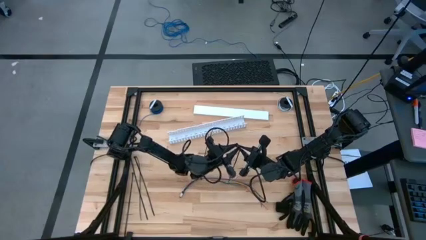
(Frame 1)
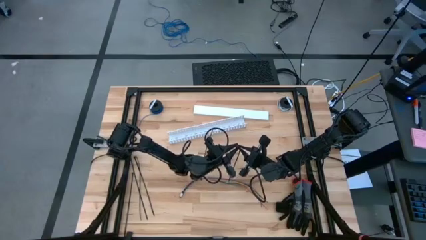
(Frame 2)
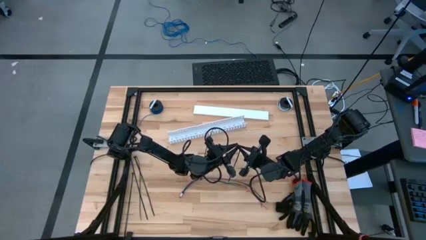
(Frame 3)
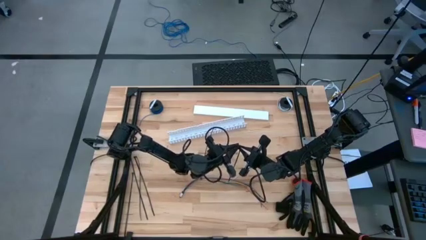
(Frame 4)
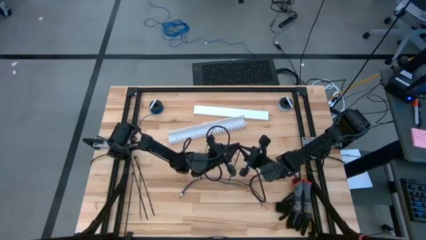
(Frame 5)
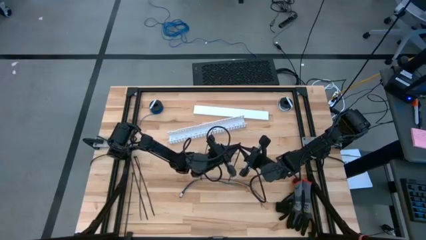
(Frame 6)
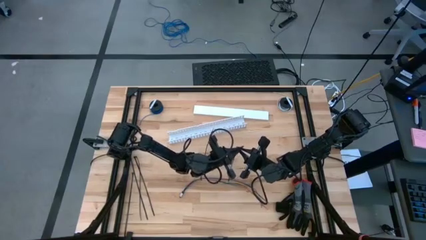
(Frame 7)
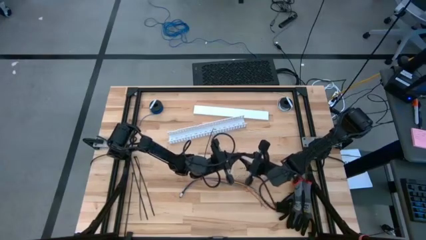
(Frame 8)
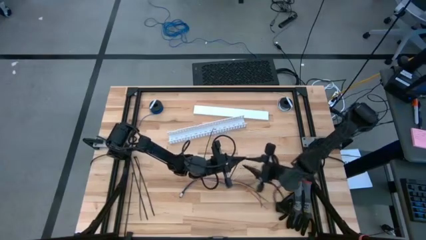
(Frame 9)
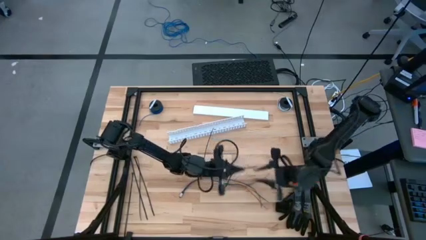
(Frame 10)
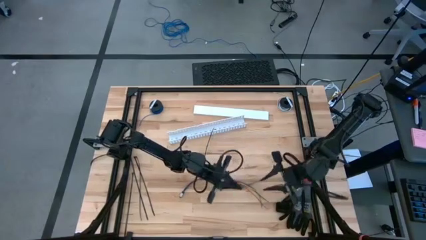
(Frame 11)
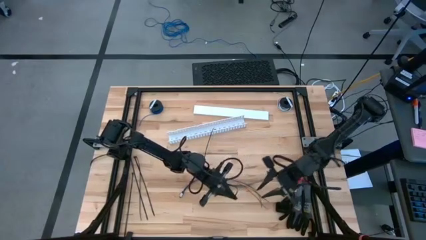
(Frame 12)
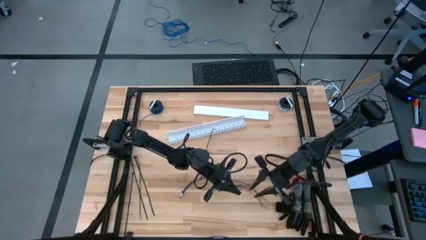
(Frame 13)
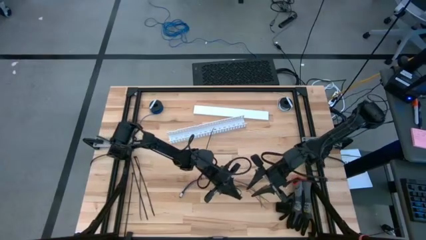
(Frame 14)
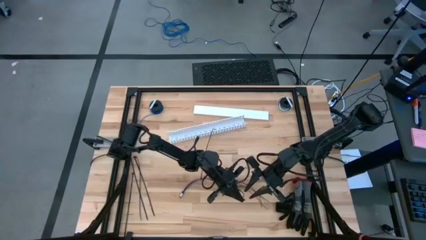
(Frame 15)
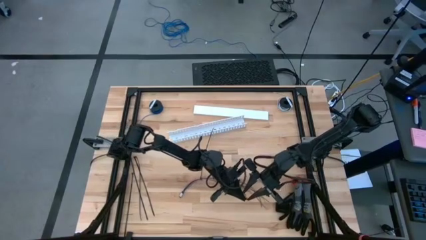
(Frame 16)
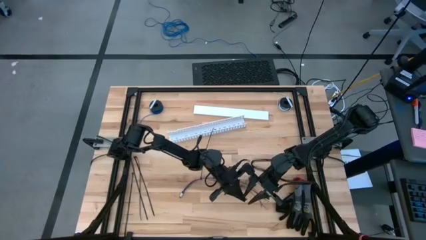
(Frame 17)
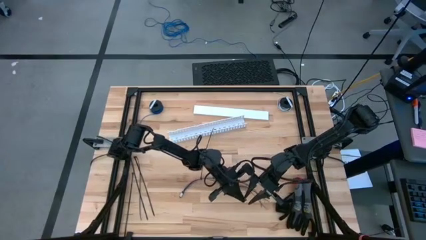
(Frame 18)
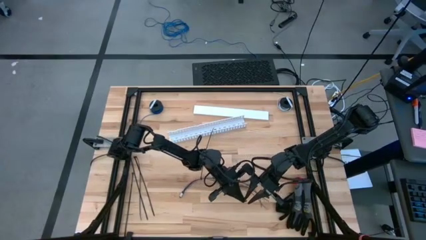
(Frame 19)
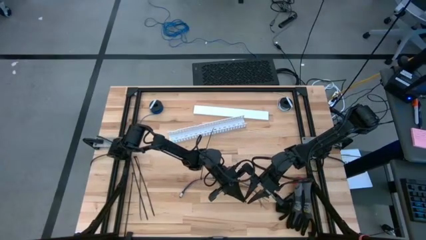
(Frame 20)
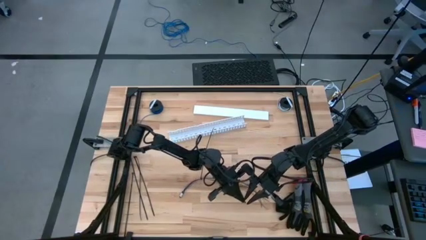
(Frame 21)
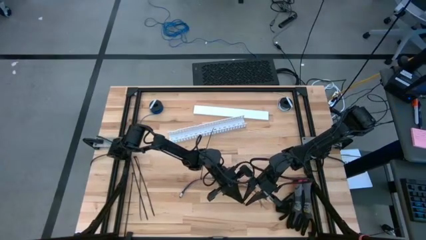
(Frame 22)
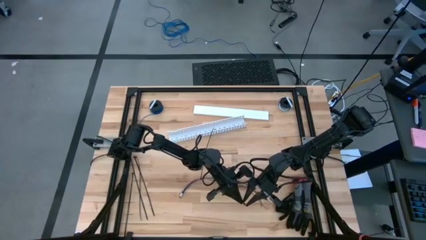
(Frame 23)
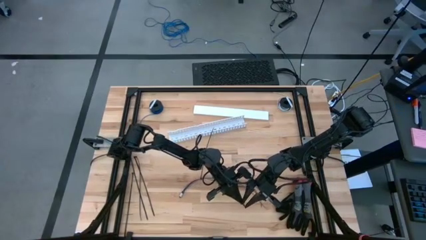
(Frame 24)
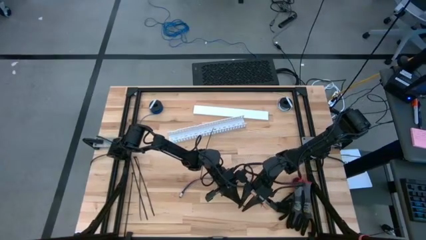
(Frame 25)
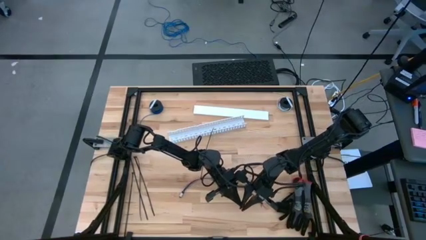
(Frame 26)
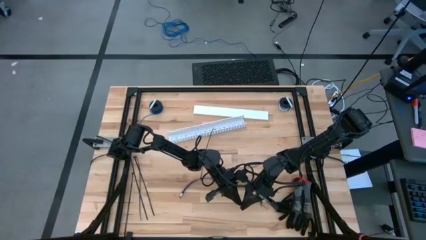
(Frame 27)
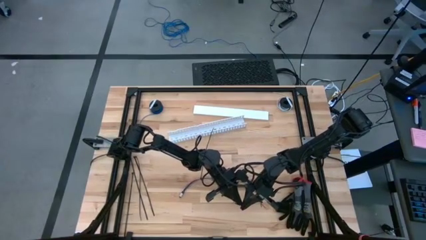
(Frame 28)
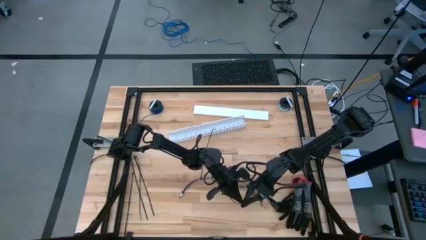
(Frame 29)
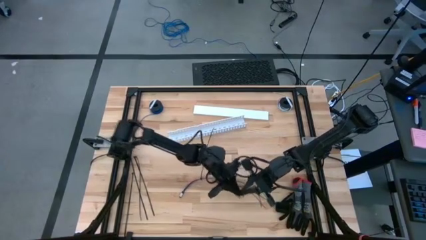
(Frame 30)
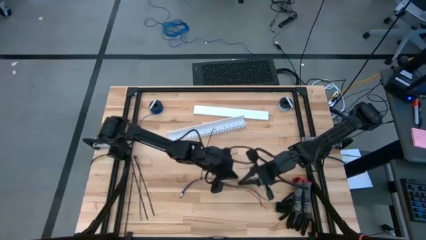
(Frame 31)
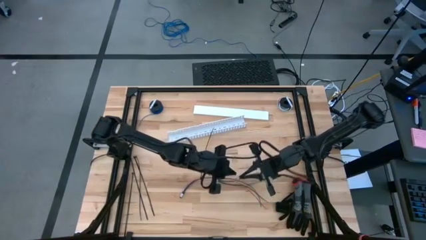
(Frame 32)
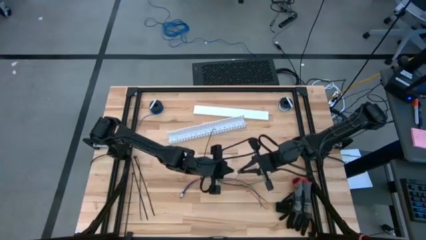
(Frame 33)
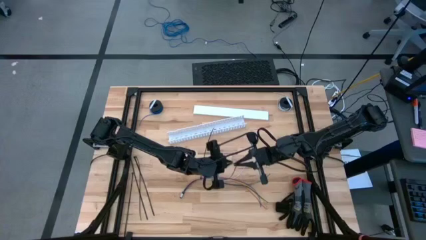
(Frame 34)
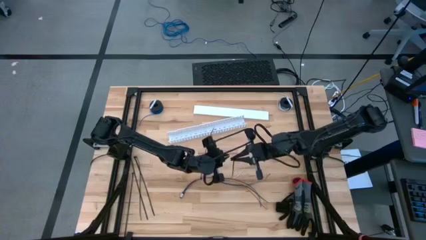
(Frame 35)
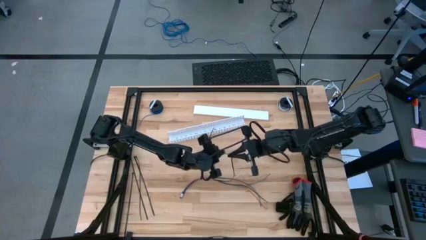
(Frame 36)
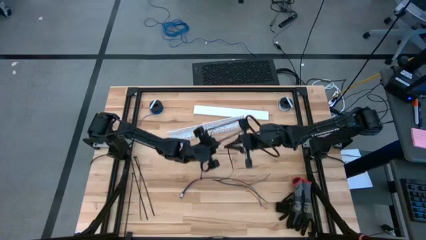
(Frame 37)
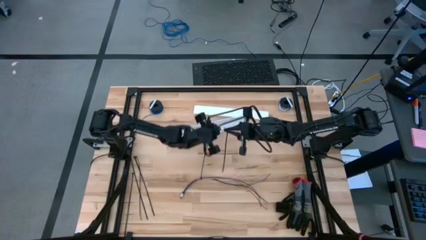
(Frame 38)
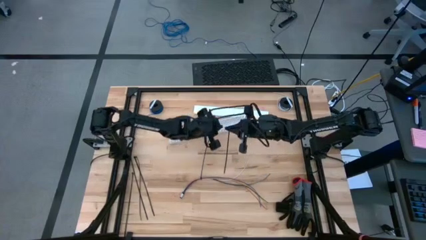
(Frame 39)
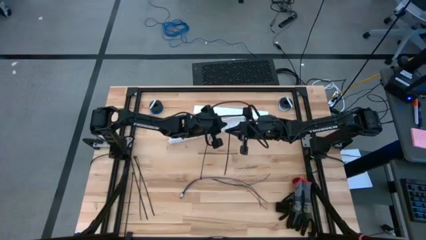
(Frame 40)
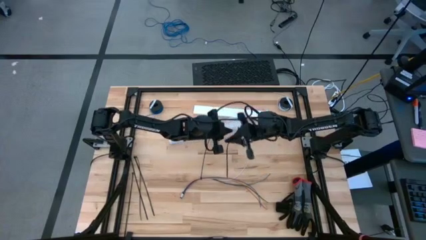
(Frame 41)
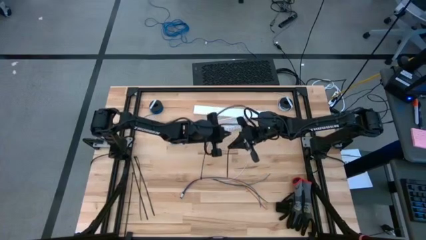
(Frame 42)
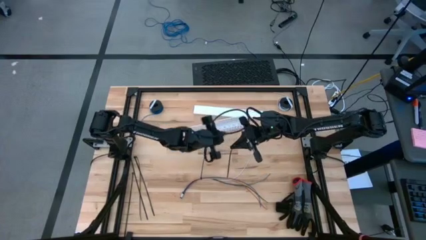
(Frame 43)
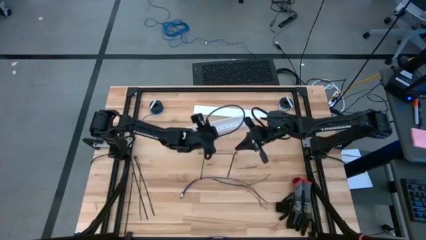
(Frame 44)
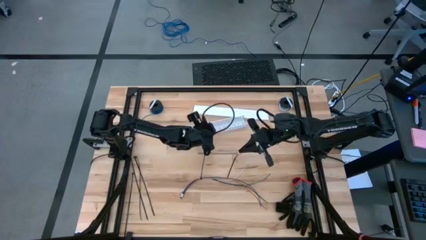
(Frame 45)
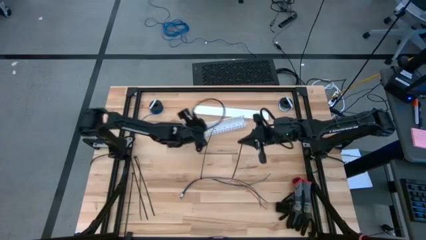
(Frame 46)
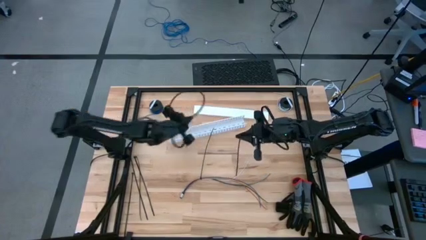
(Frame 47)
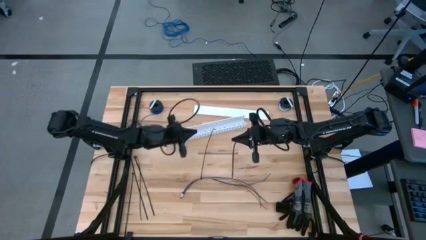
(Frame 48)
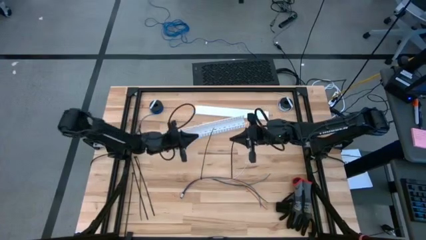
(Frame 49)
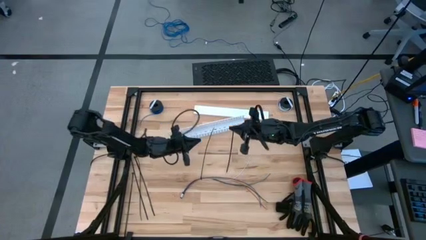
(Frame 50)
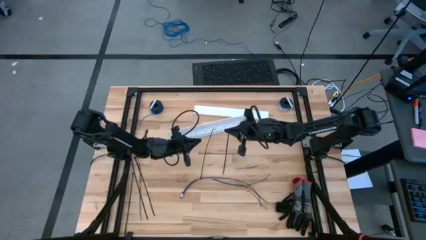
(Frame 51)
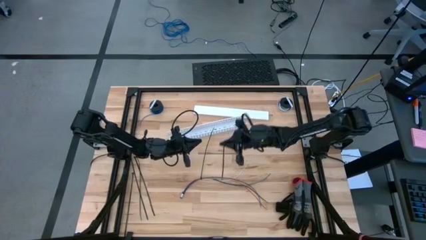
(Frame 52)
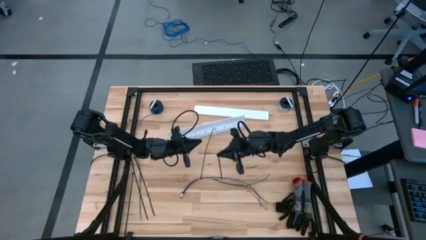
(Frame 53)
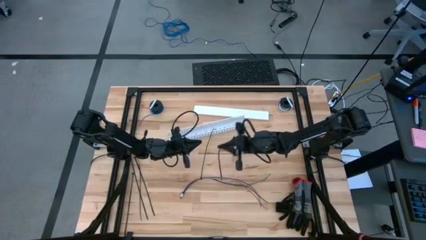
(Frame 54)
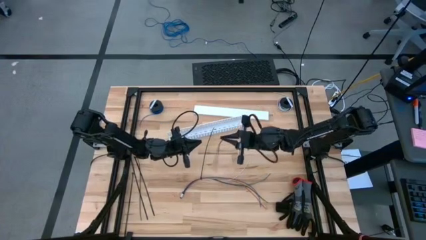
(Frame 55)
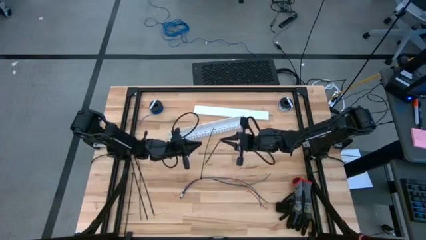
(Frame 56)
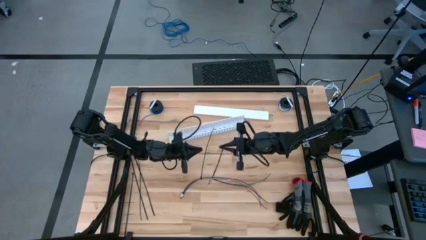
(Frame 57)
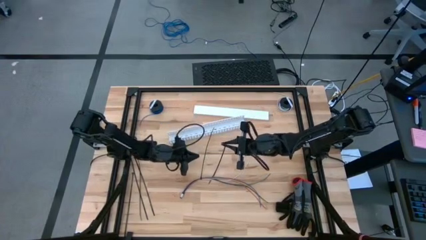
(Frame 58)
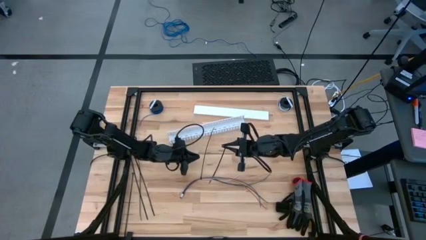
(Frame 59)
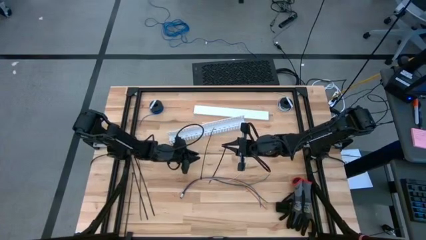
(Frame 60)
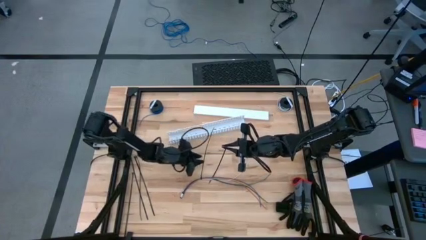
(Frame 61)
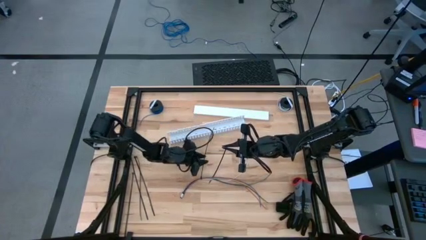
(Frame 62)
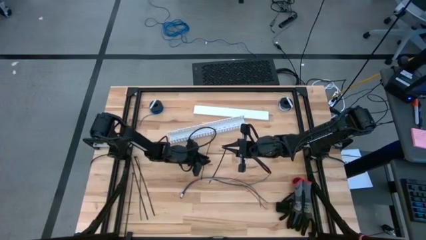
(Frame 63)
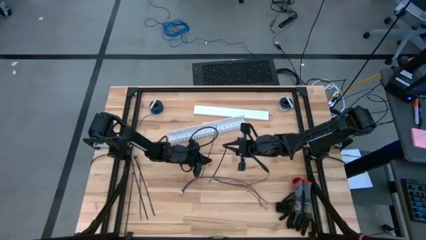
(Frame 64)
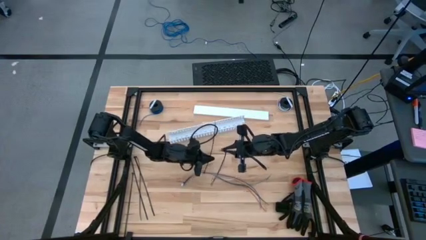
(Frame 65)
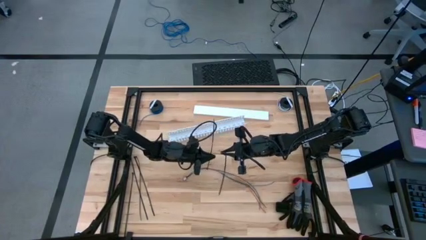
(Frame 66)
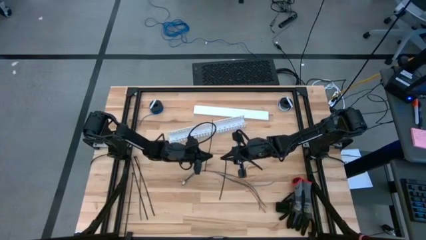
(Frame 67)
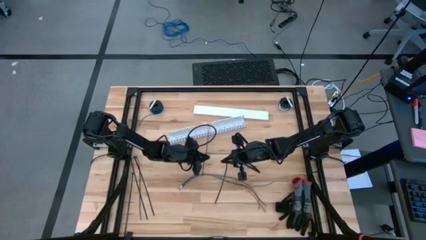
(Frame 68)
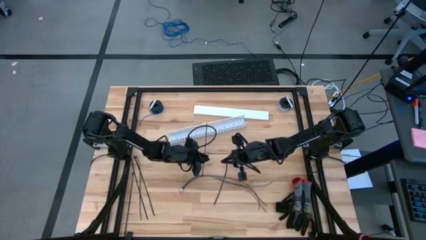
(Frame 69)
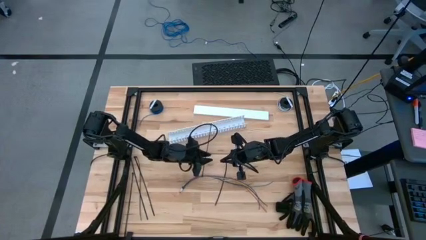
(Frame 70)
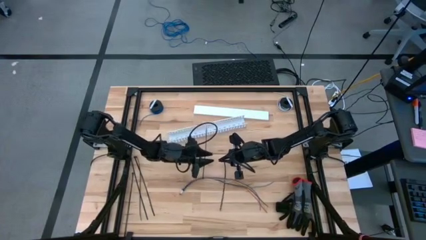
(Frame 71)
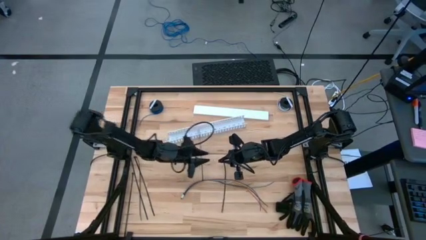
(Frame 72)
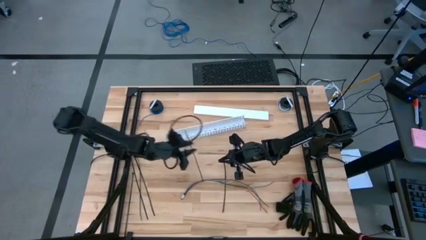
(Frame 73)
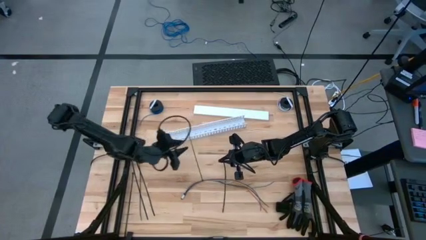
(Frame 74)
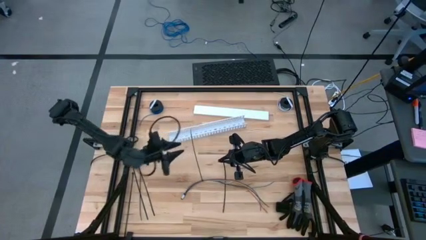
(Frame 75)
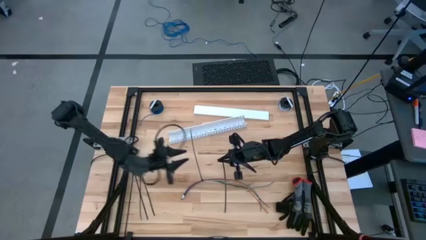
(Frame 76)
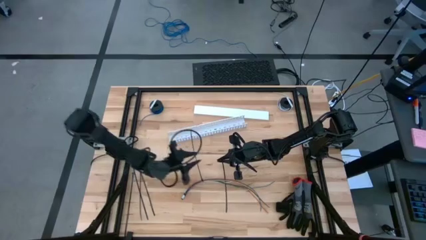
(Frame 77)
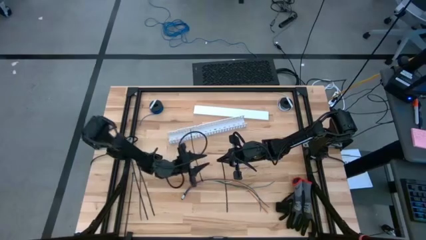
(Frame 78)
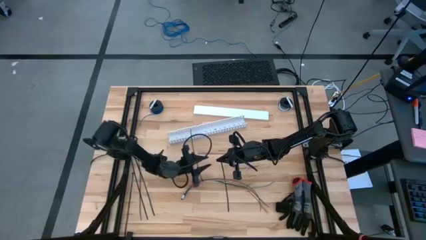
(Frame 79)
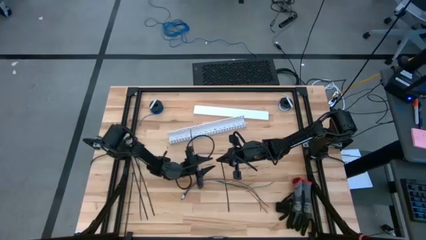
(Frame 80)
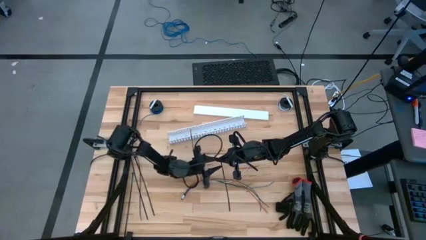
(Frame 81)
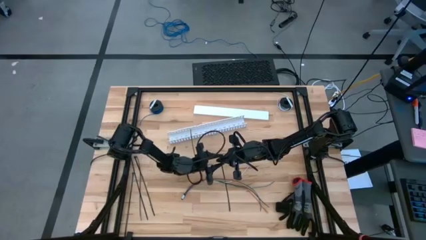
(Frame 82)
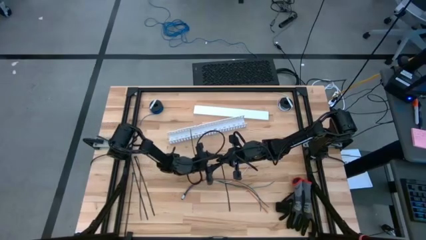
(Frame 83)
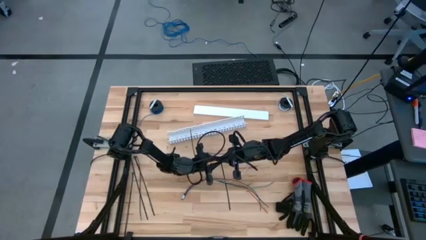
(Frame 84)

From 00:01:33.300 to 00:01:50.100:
Task: Ziptie cables
Wrap the colored loose cables with the black zip tie
